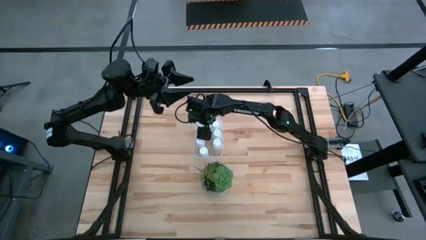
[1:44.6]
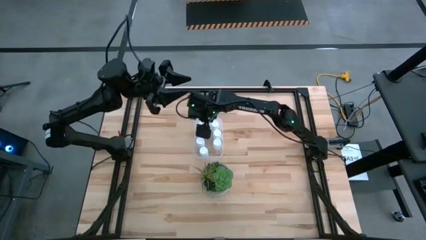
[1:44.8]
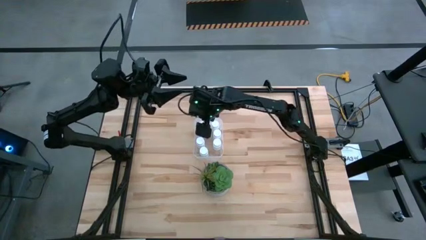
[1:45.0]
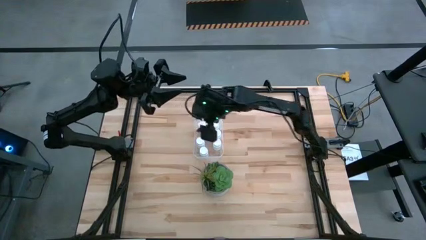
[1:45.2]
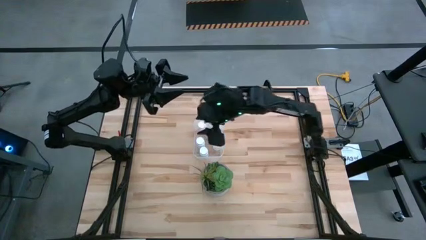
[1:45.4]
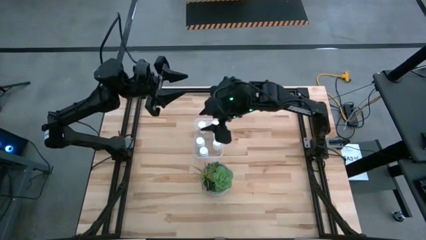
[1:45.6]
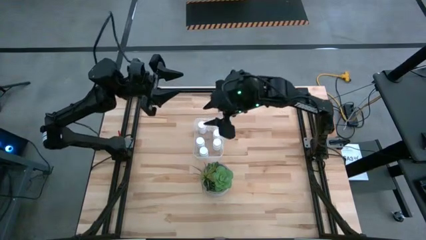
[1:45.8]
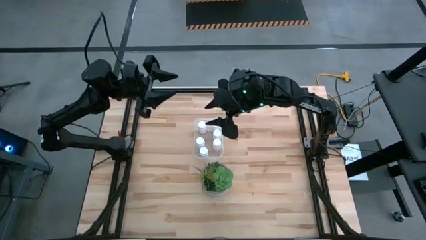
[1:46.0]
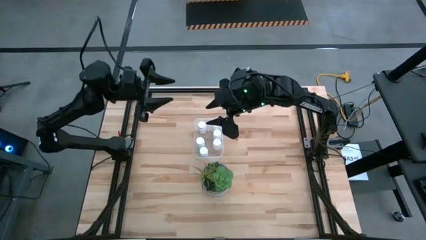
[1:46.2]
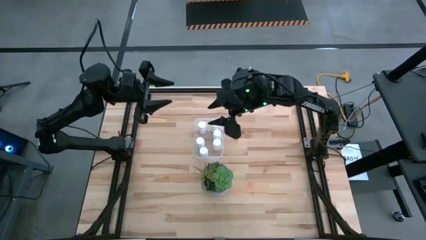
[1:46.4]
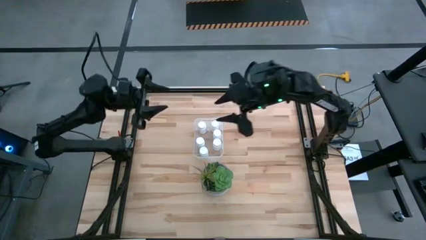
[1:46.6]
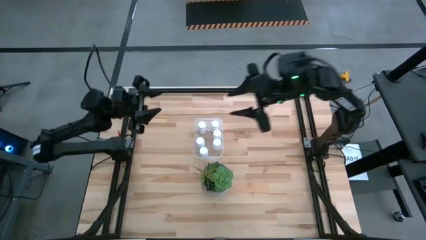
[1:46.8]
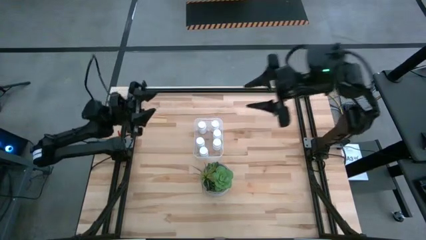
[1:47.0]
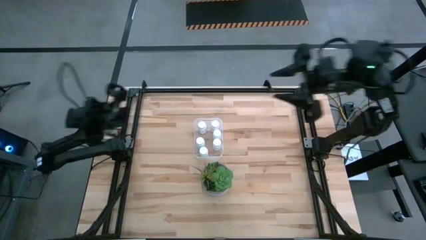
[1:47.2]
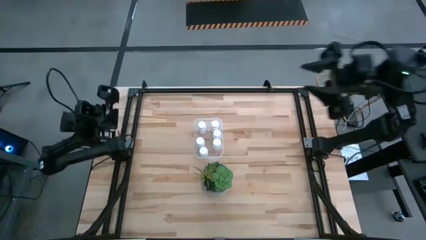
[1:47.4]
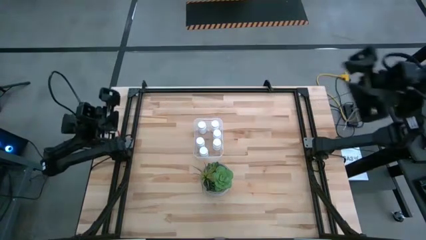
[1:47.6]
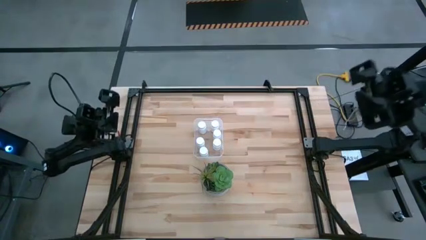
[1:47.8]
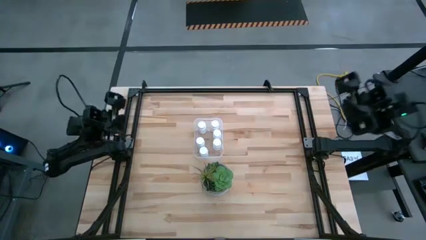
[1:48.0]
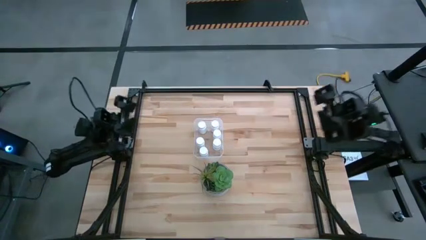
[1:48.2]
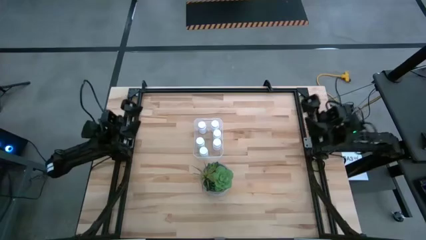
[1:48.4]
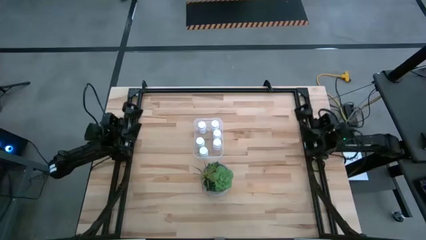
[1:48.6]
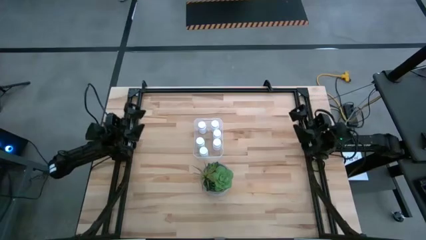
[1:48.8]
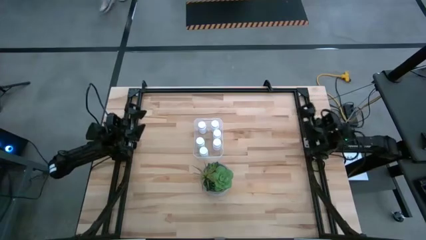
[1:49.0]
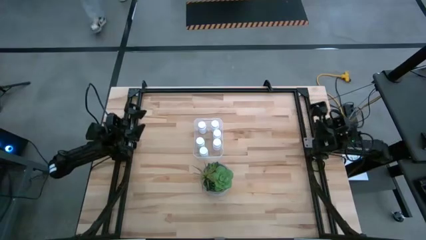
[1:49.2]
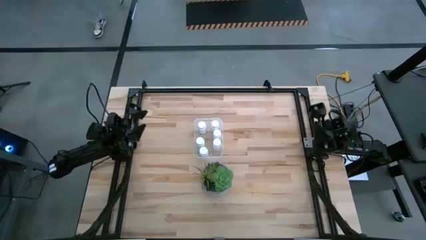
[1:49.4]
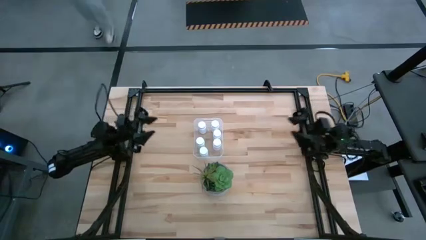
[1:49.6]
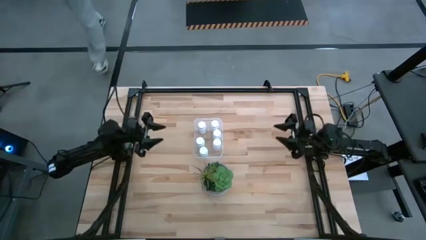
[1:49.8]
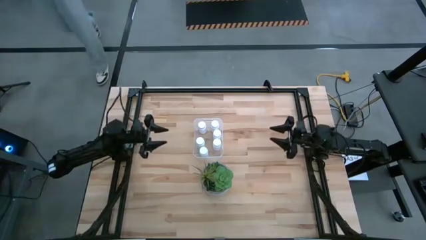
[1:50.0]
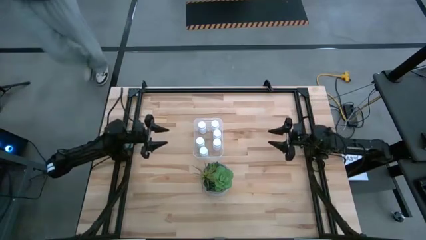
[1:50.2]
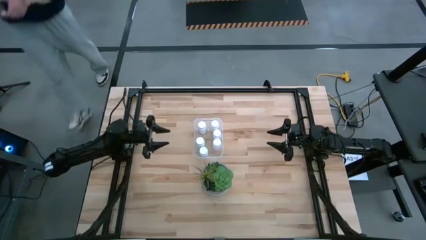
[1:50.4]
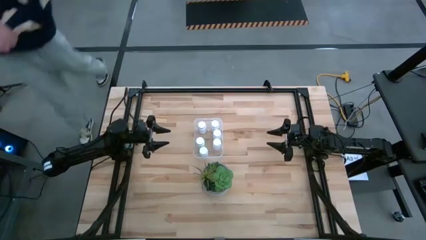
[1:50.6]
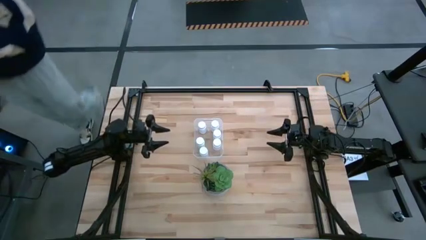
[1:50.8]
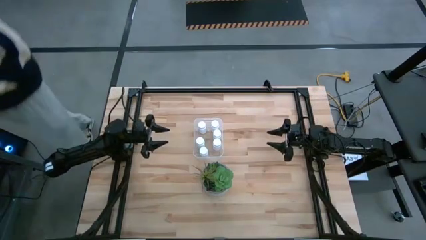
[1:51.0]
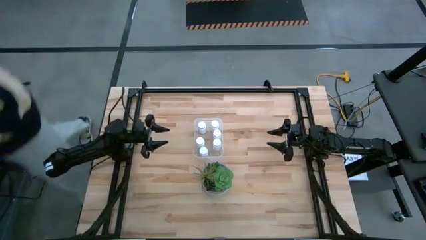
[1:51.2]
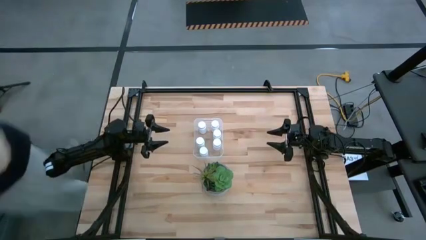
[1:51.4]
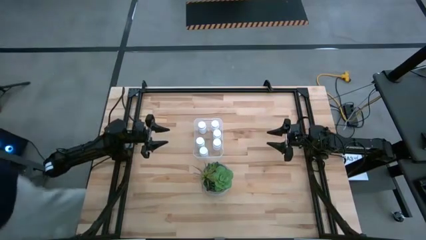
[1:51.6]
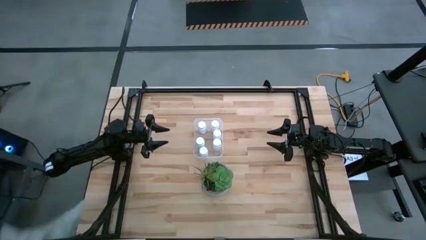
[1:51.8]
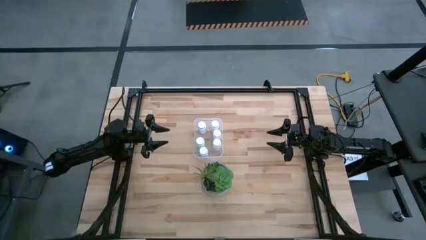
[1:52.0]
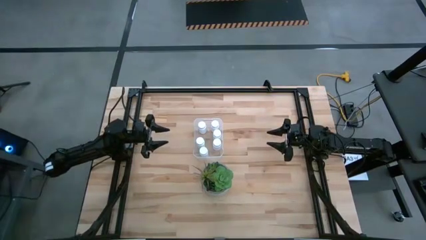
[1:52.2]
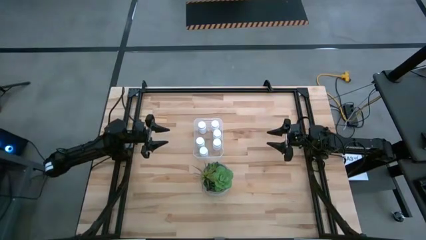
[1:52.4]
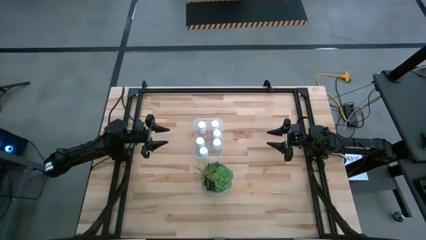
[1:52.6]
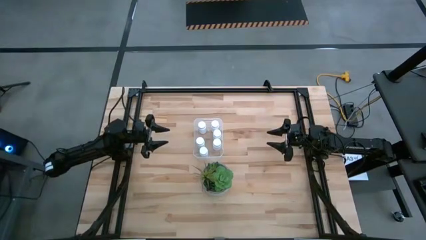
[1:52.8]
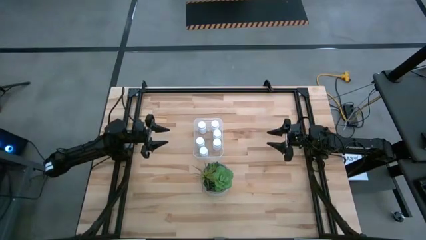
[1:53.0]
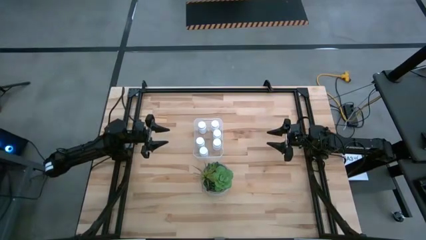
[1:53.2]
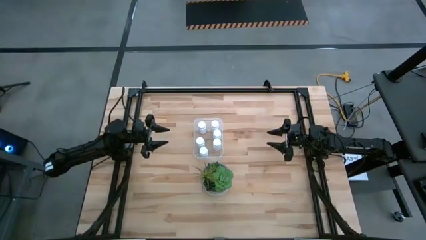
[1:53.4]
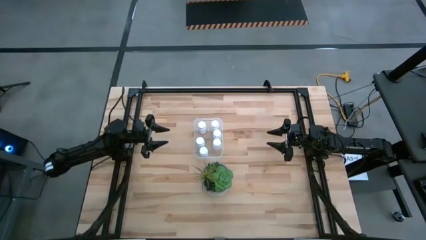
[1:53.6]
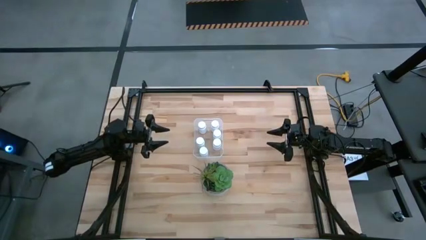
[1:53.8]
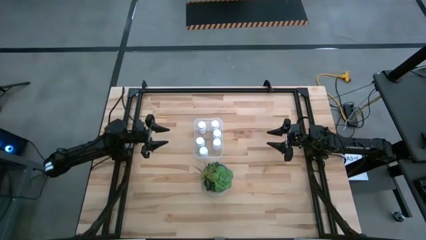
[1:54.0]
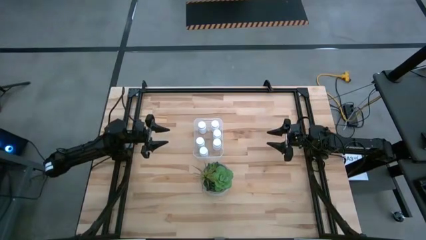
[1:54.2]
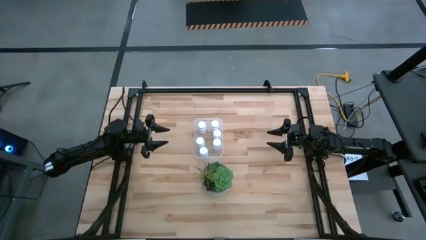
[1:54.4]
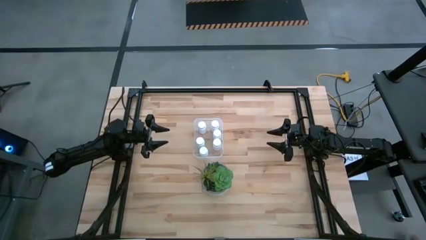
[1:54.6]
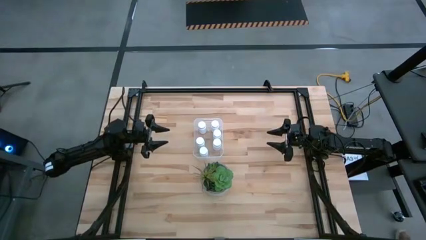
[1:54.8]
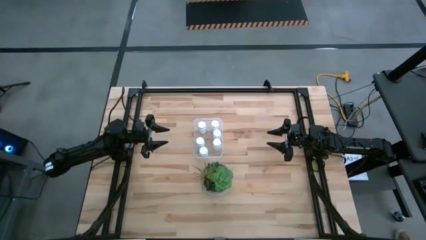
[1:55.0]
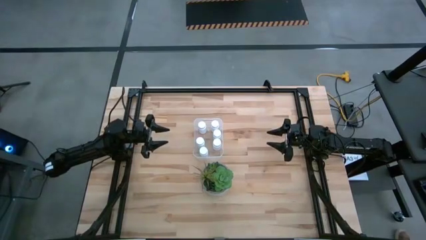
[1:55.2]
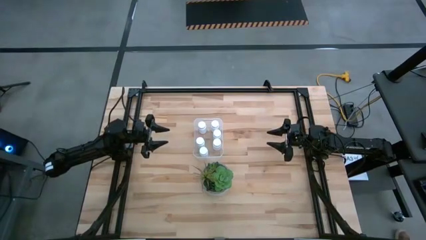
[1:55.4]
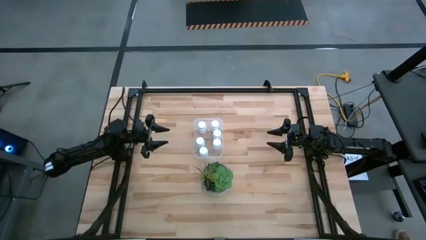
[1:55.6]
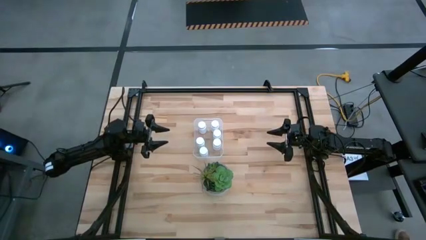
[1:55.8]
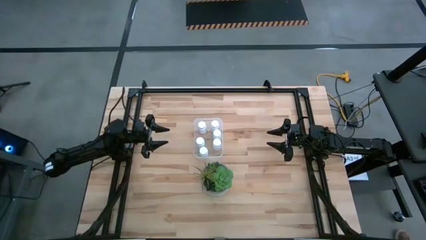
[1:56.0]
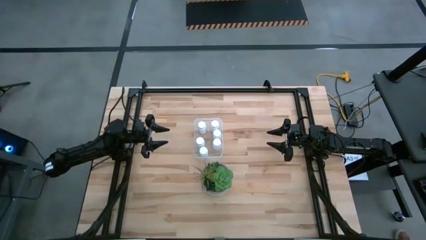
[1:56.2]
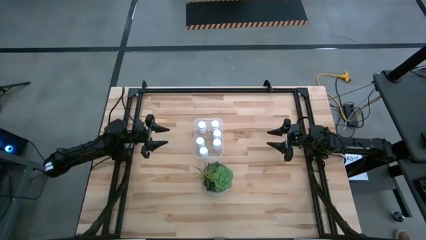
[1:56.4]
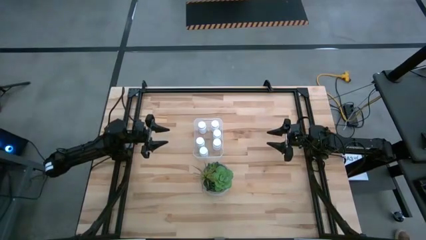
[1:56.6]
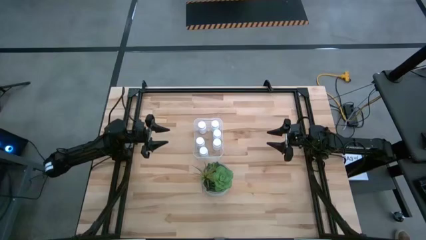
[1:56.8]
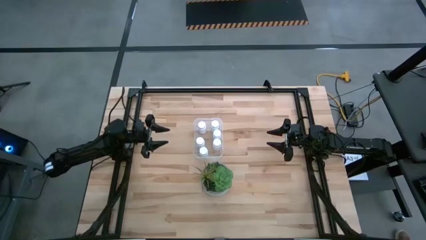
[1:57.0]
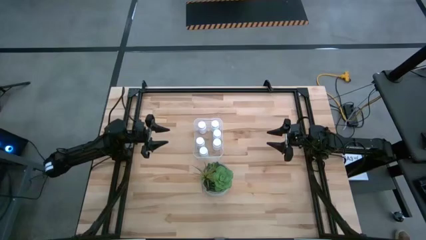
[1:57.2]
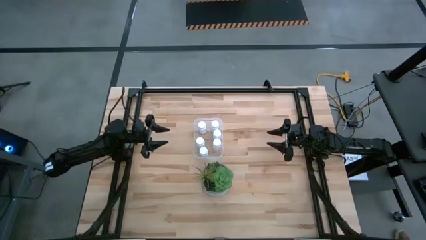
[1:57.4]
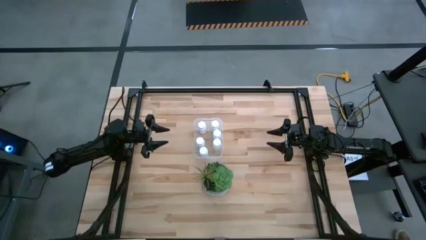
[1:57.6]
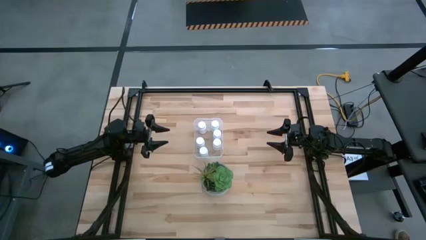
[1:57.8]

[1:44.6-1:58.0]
Task: Pick and place pill bottles into a basket
Return to Home Position

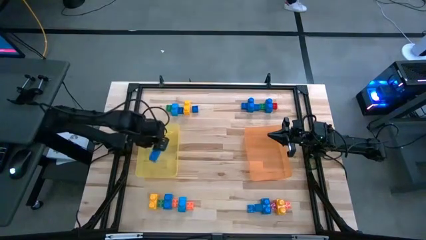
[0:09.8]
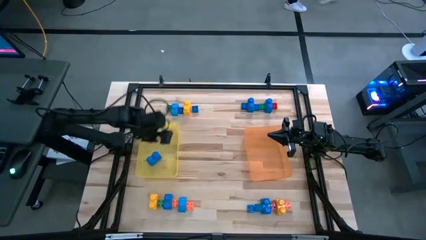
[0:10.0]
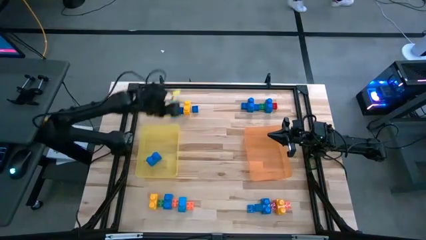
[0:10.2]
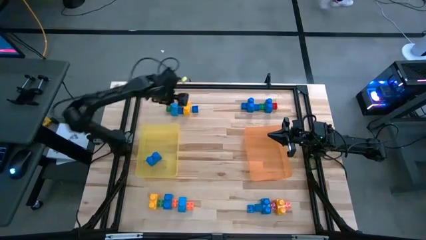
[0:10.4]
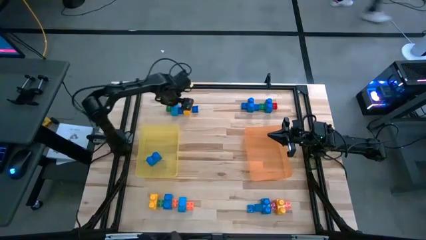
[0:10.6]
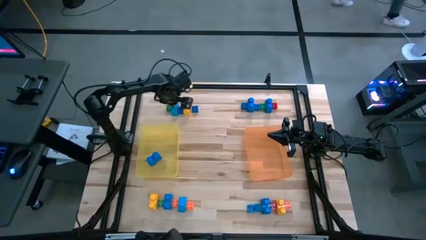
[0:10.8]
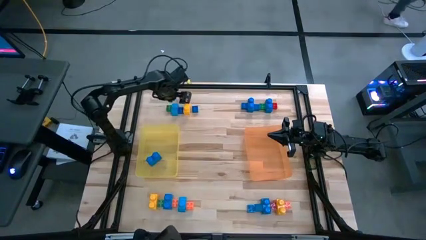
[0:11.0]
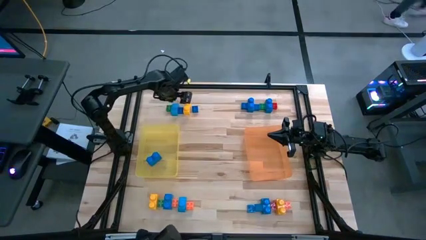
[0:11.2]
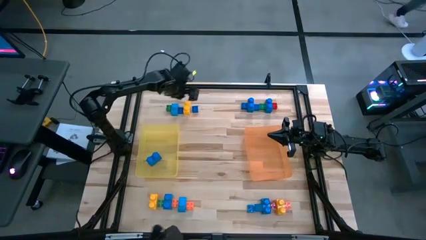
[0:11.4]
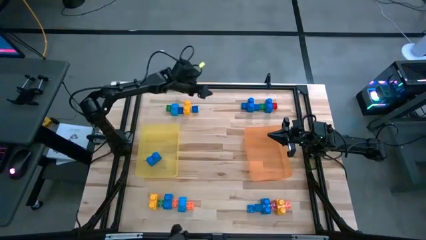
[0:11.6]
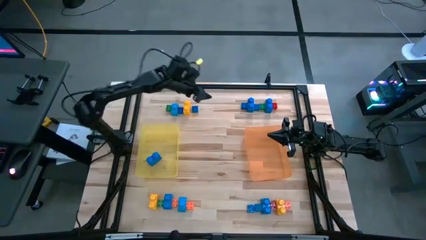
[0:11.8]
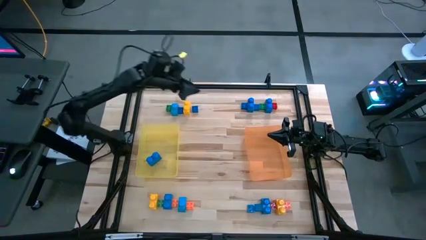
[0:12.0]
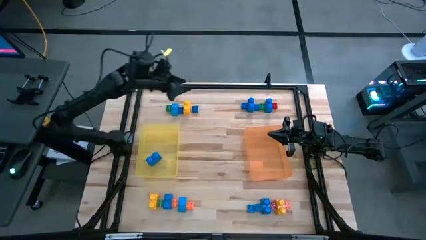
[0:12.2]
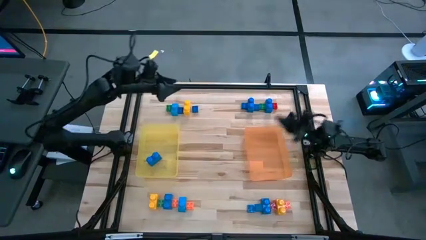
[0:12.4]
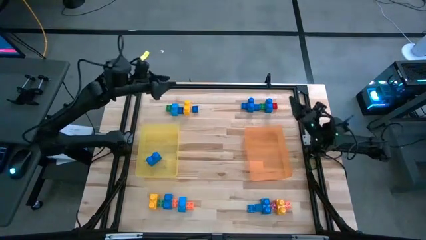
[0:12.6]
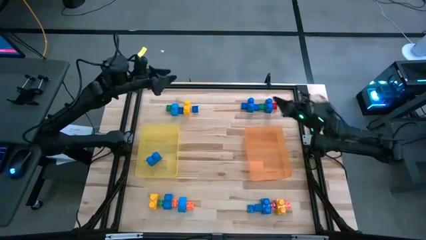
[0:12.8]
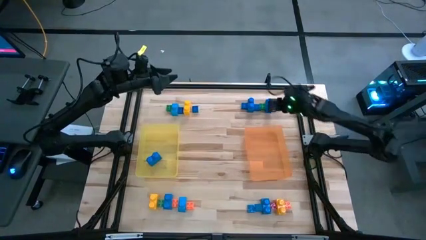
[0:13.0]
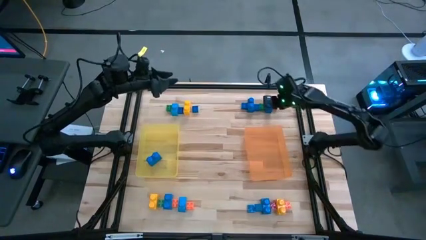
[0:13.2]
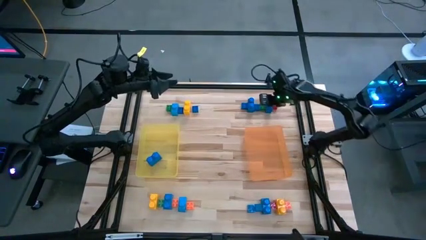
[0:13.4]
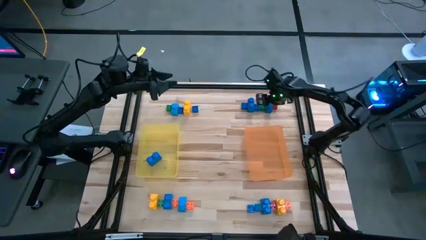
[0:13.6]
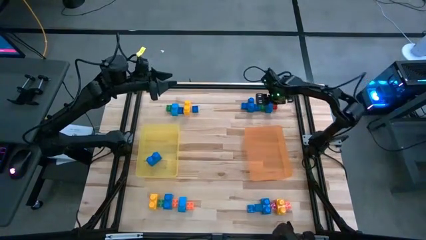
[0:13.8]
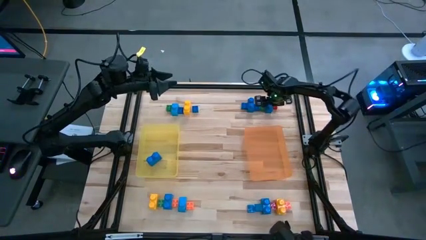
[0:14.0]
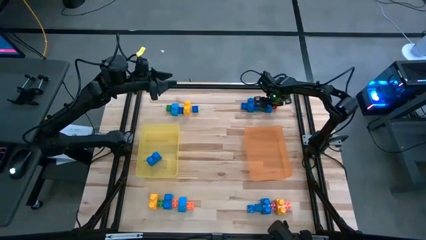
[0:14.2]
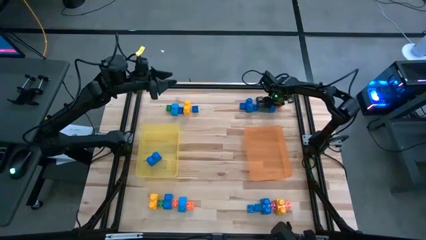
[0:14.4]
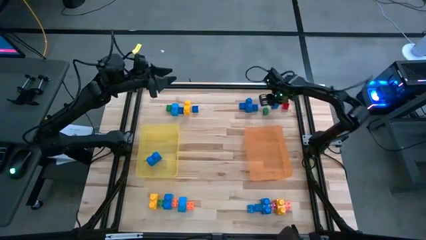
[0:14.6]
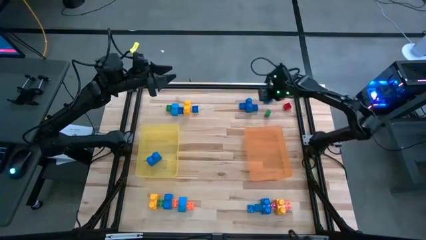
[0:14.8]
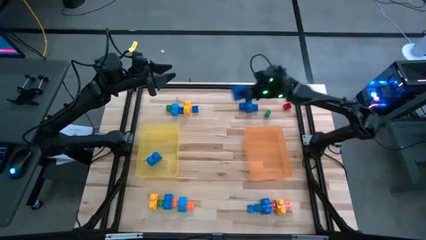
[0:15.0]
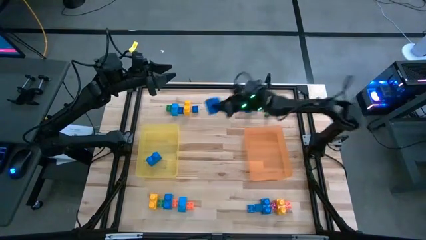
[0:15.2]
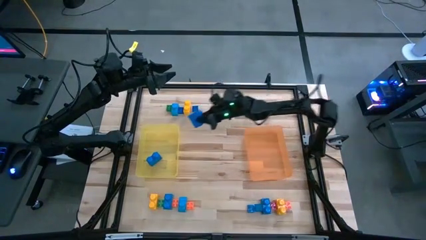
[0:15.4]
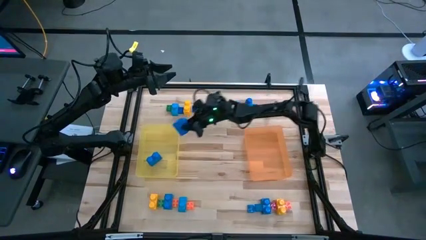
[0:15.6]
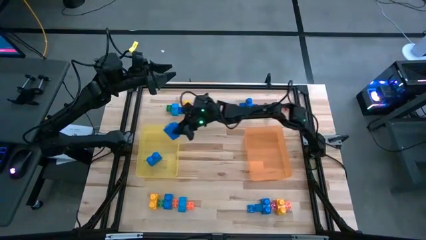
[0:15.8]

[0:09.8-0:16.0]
Task: Sort blocks by size
Put the large blue game piece into the yellow bin
